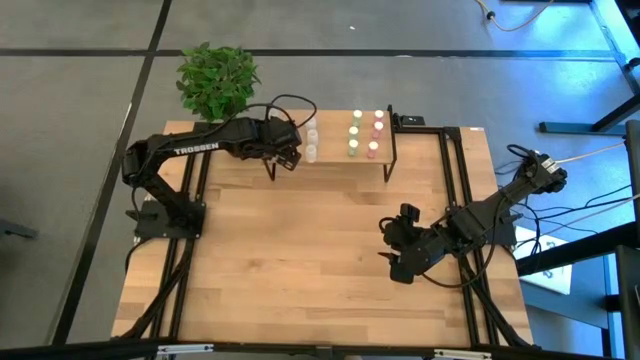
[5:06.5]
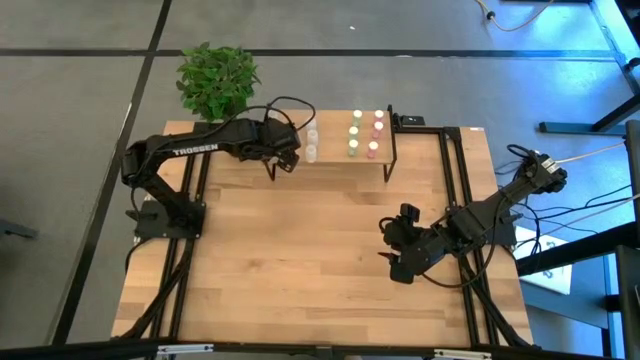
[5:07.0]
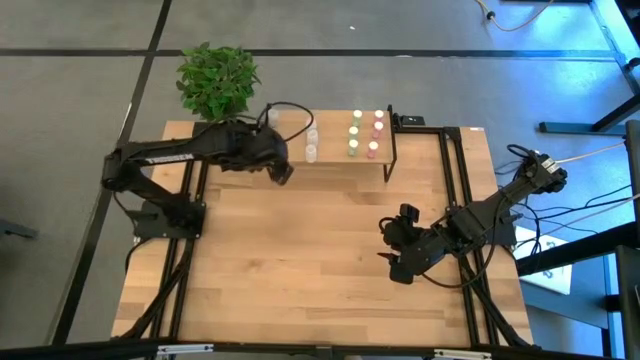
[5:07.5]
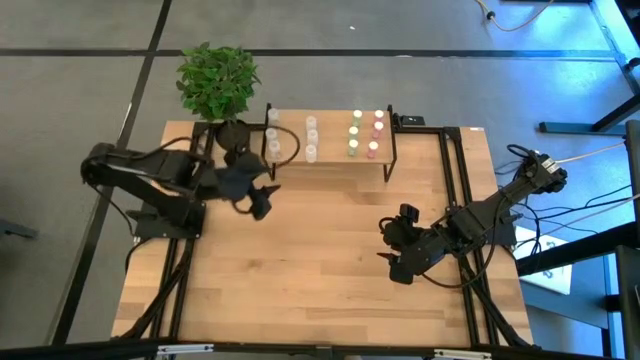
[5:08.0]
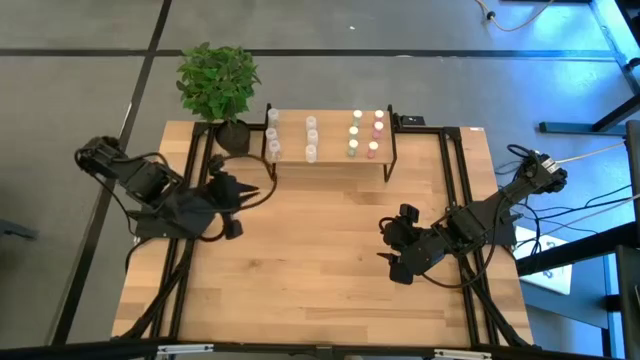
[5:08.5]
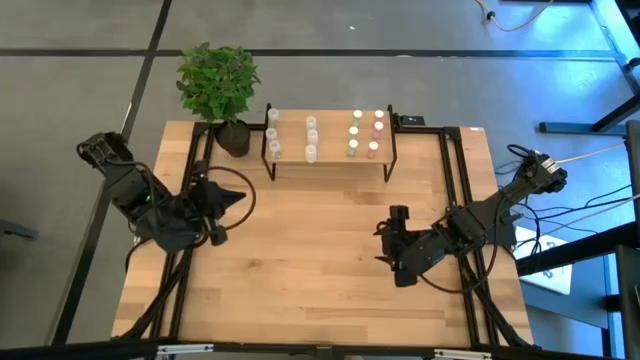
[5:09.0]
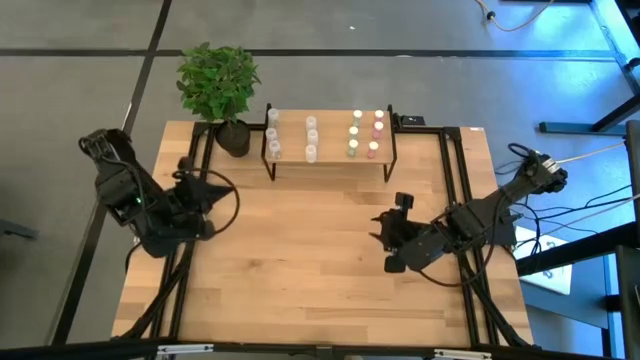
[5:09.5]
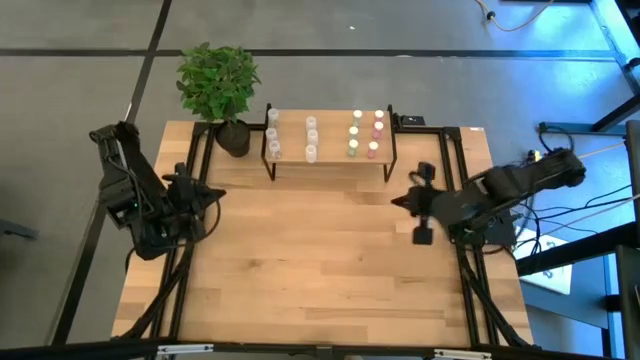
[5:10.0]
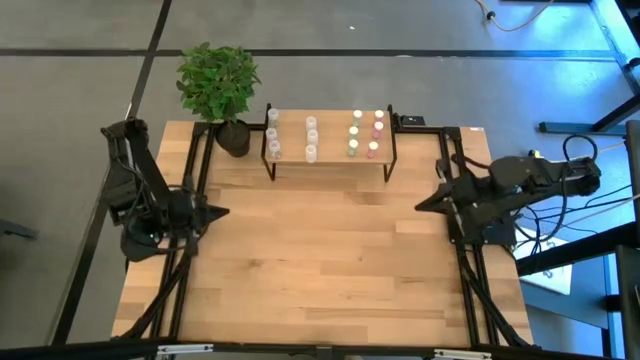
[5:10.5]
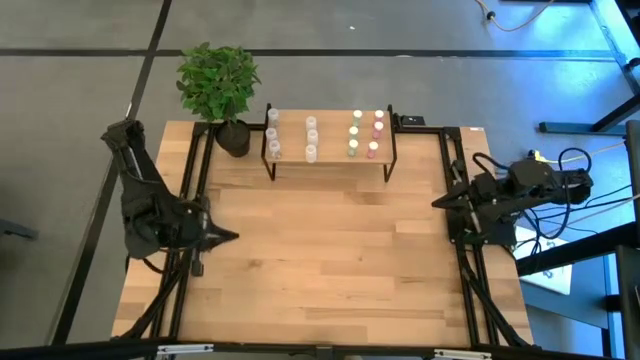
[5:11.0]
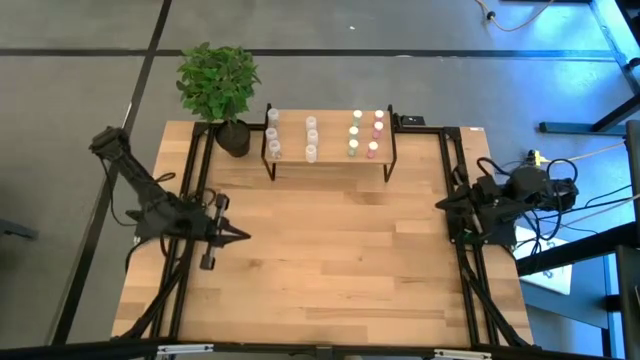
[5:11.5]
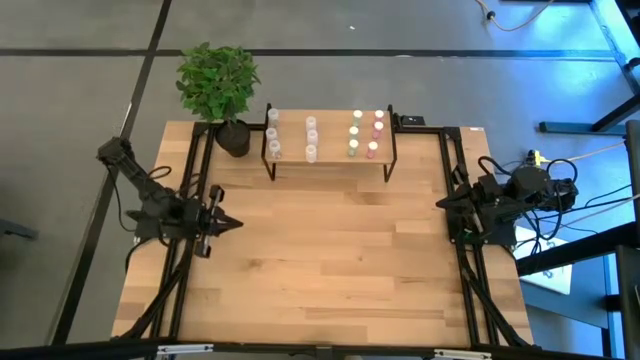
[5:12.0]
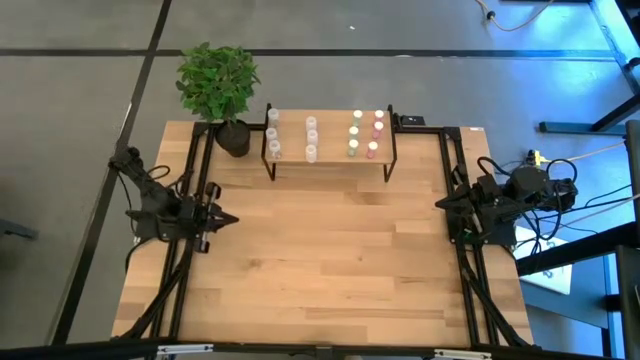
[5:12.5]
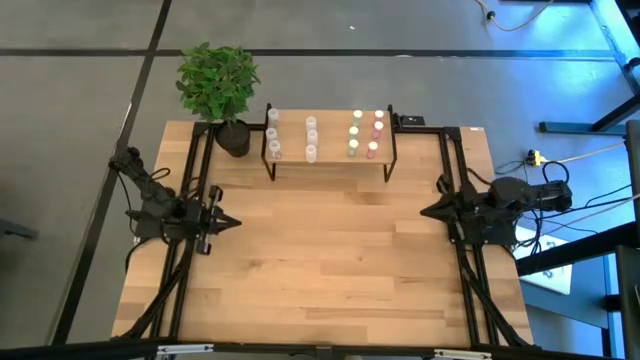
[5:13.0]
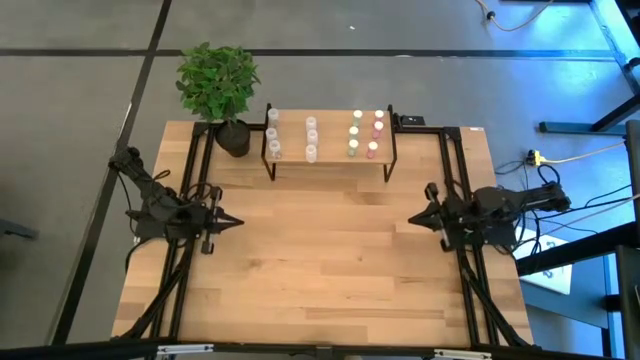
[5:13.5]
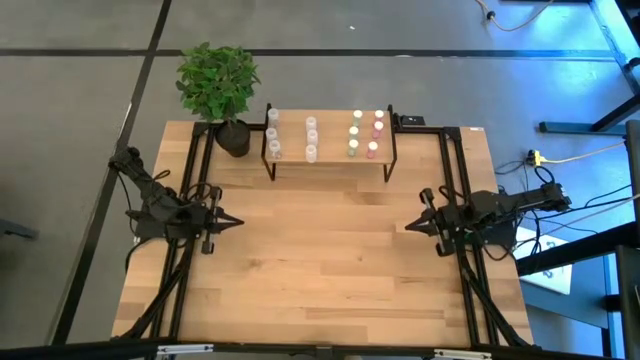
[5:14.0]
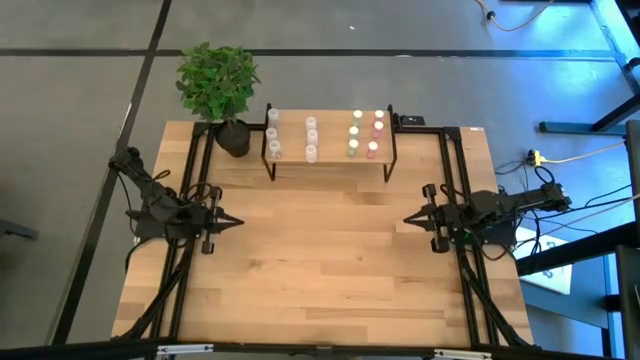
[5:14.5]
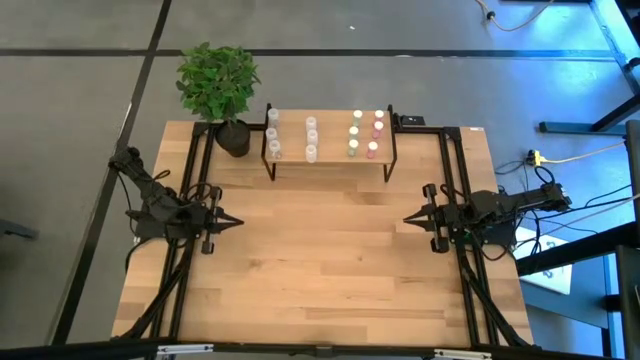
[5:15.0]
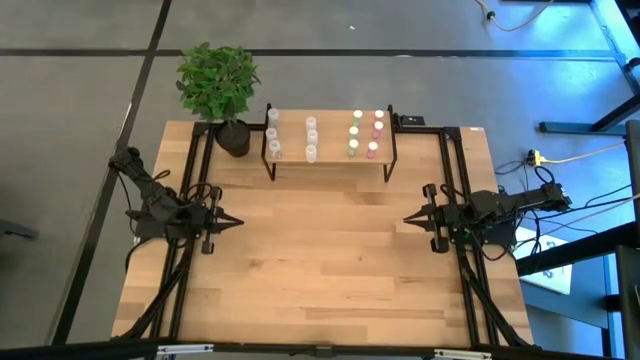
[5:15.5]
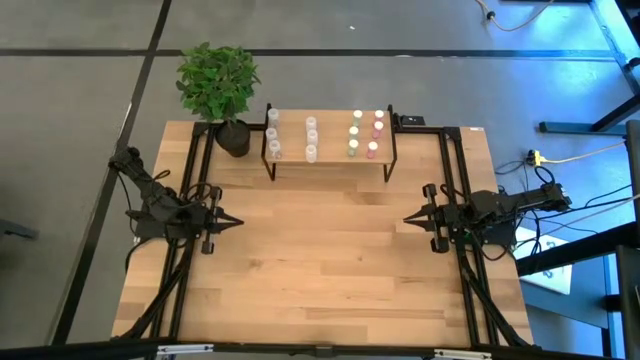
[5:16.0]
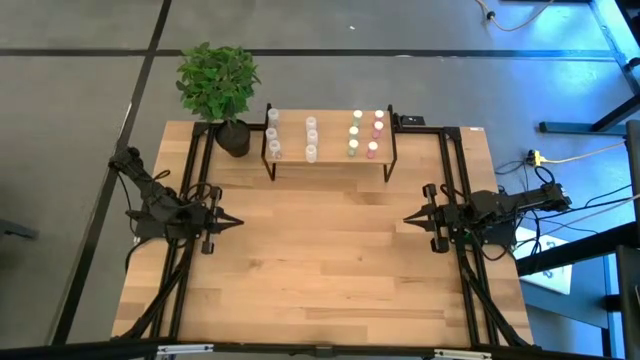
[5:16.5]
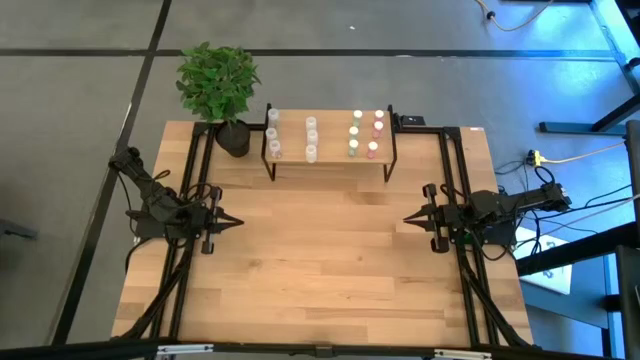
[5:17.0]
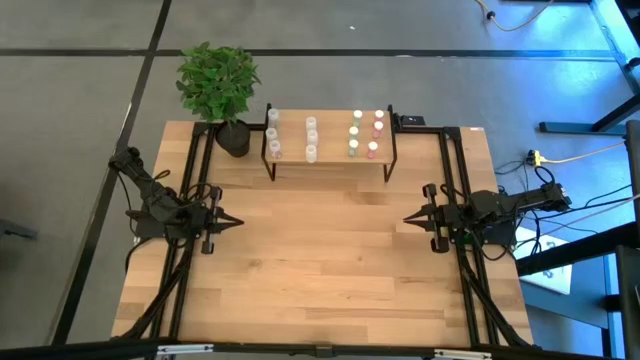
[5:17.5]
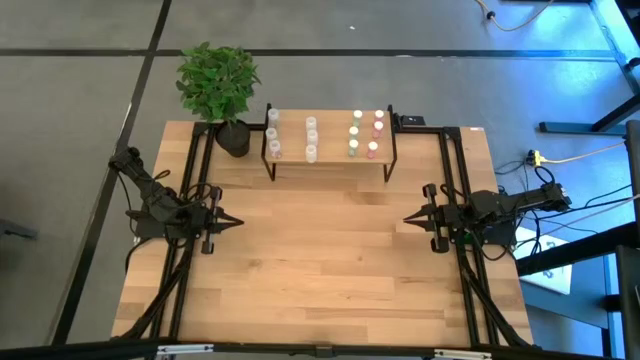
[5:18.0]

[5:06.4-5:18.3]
Task: Pick and place medicine bottles onto shelf by color
Return to Home Position

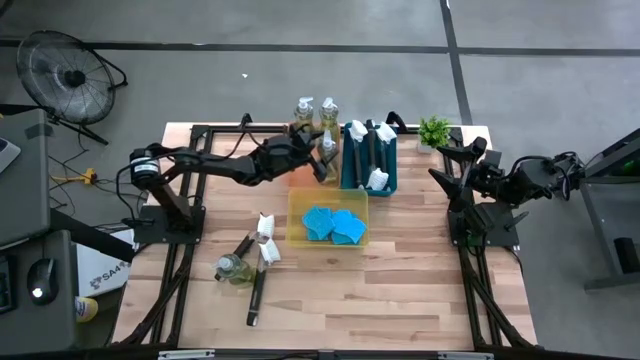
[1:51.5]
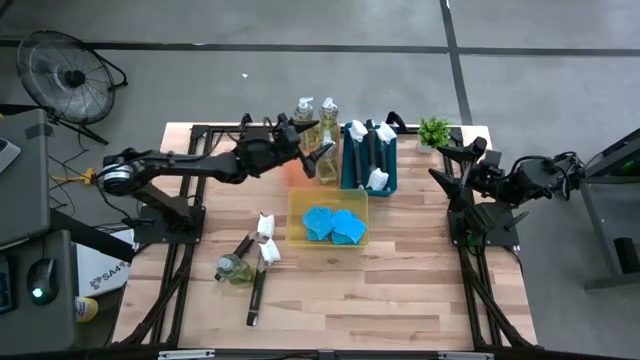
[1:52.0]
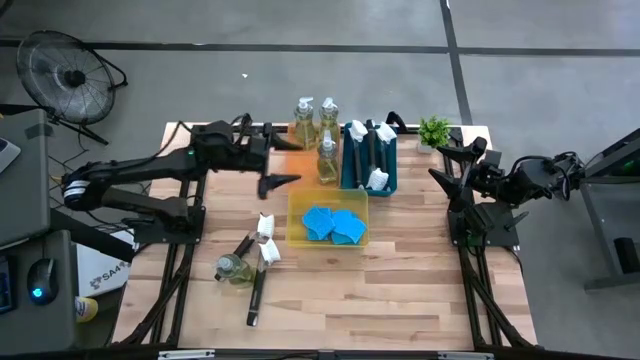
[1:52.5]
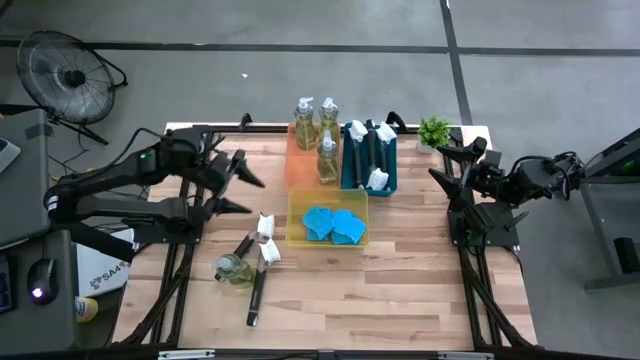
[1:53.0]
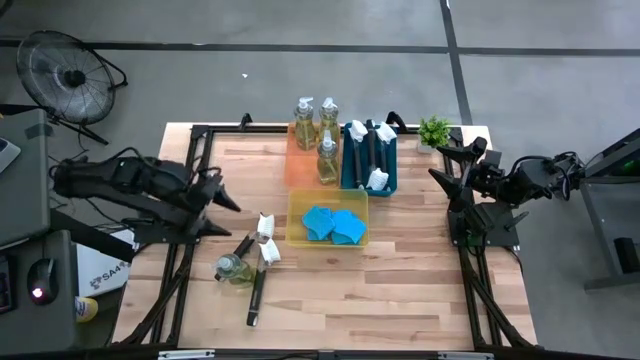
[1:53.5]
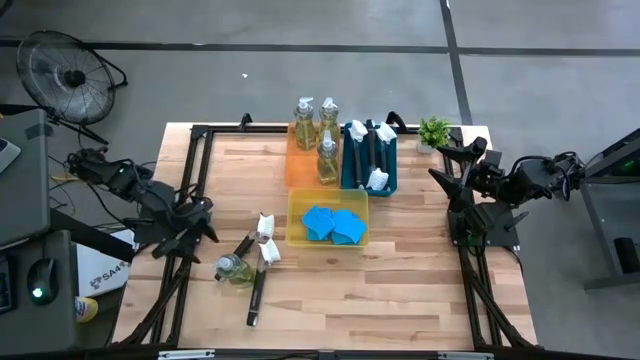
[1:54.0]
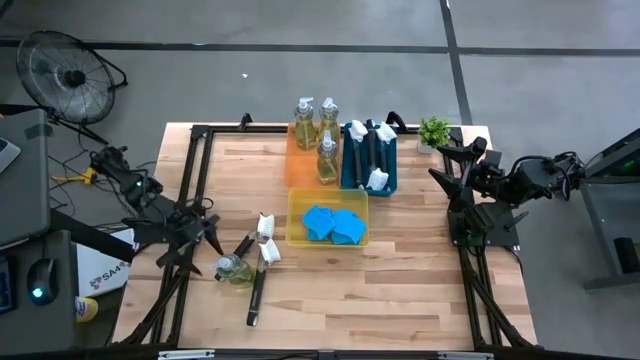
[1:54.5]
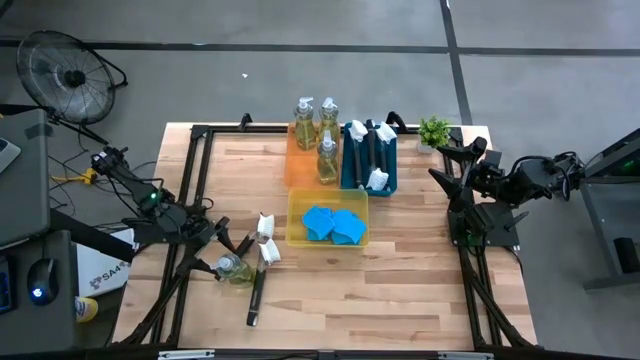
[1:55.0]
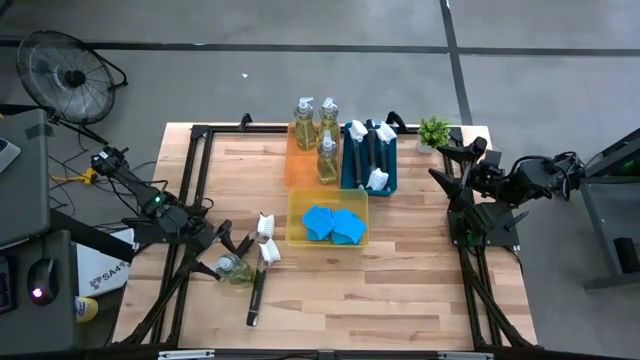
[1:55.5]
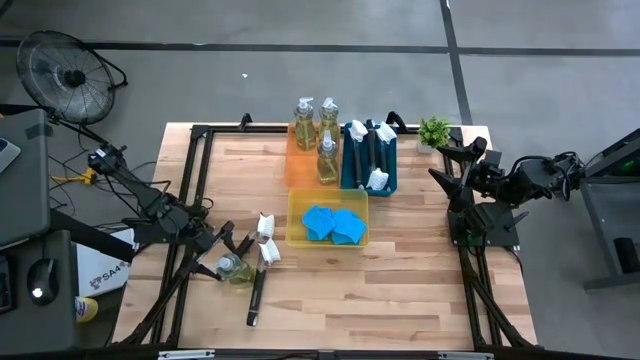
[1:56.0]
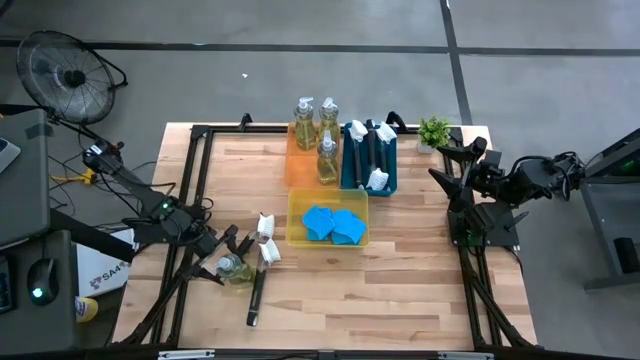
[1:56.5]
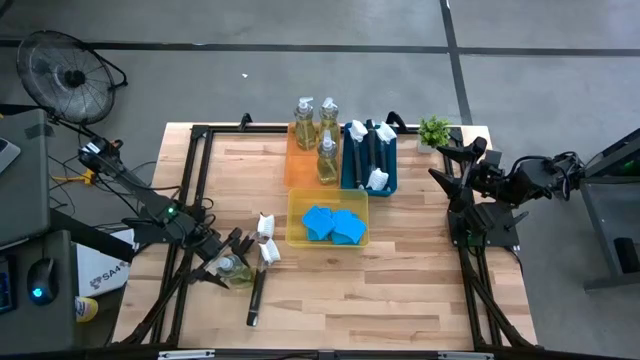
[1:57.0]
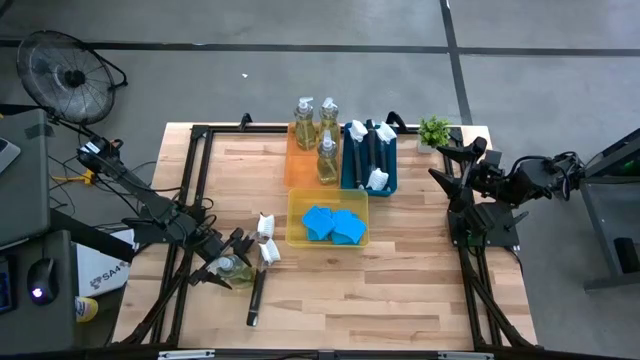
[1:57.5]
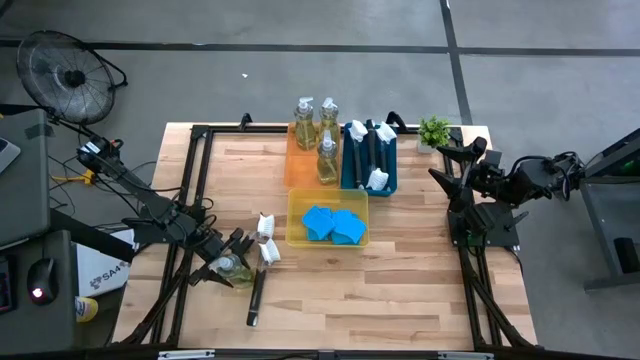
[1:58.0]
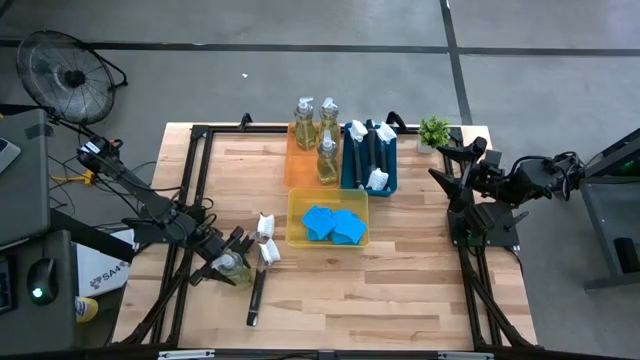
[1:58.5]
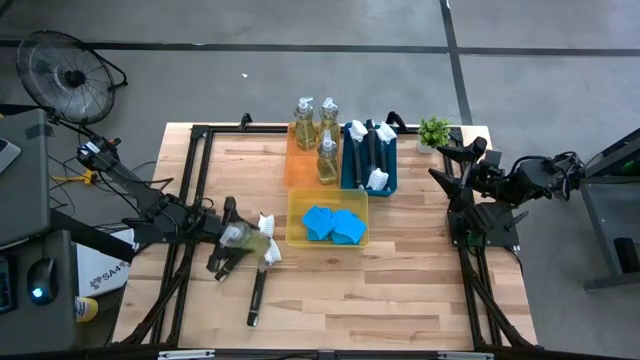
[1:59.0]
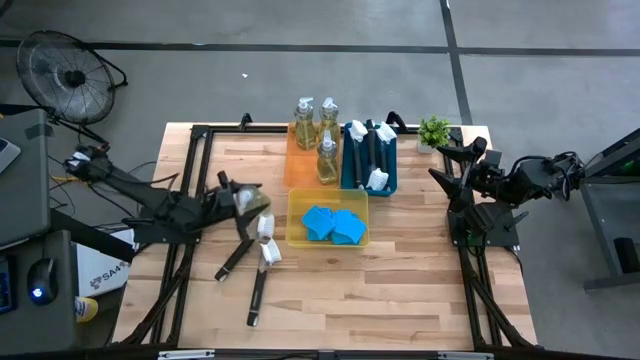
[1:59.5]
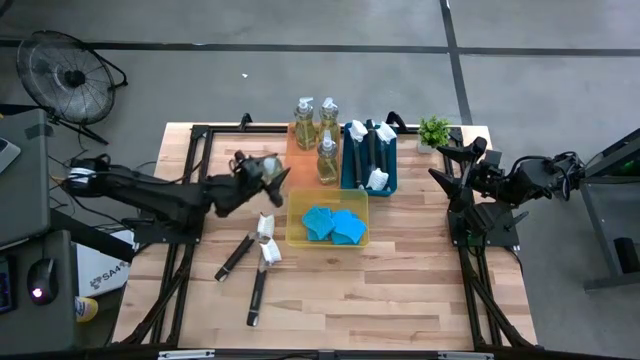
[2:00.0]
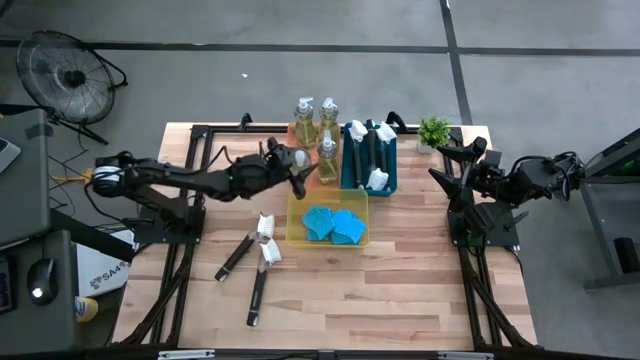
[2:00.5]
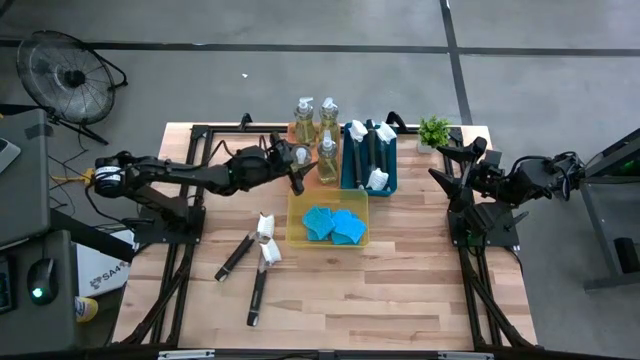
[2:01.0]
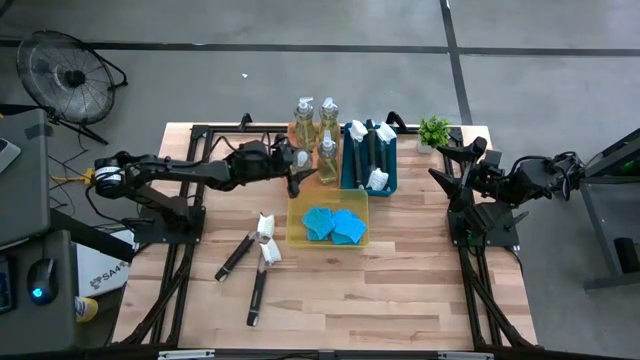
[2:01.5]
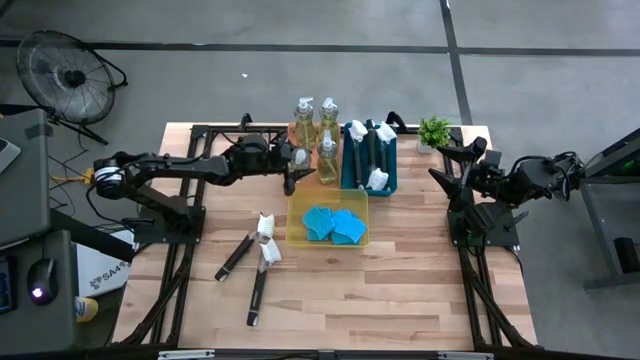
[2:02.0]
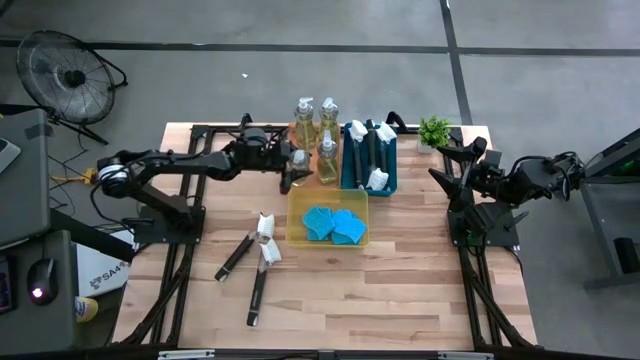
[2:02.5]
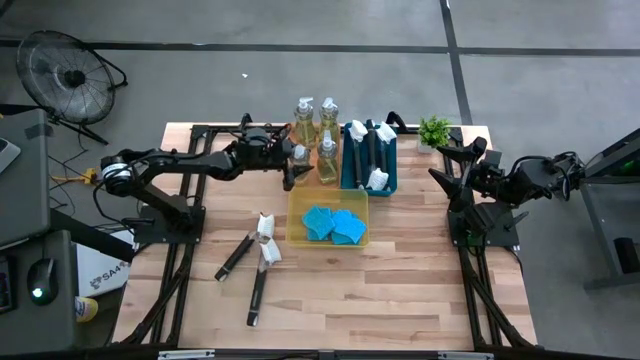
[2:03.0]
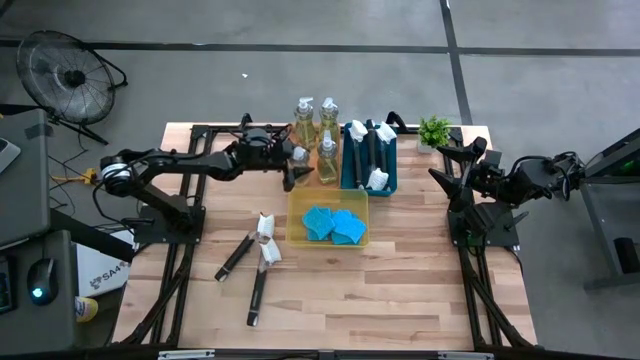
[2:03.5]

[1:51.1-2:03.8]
Task: Pick & Place Kitchen Sink Supplies
Put the dish soap into the orange bin
